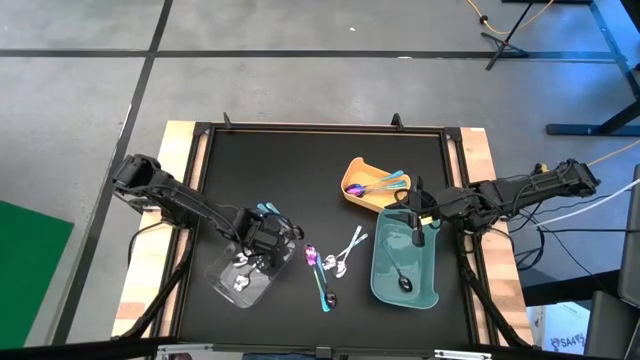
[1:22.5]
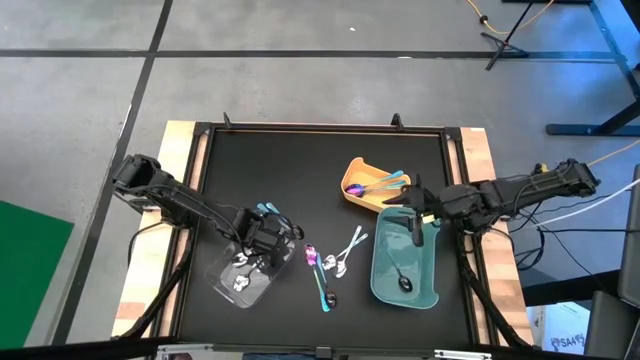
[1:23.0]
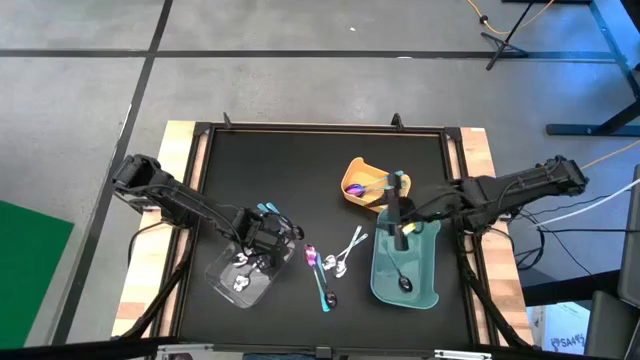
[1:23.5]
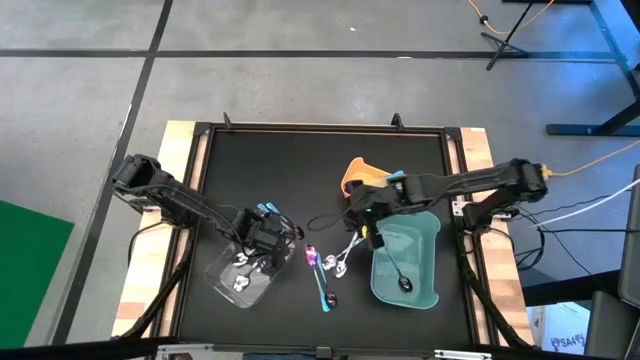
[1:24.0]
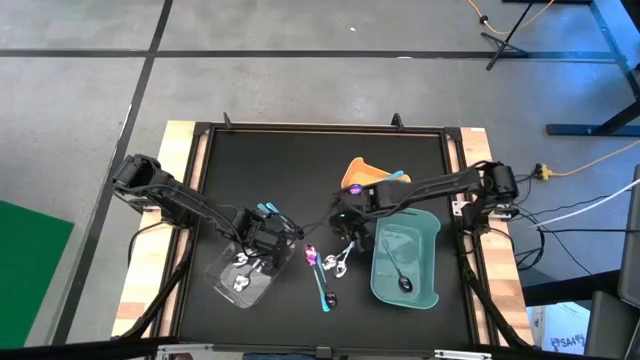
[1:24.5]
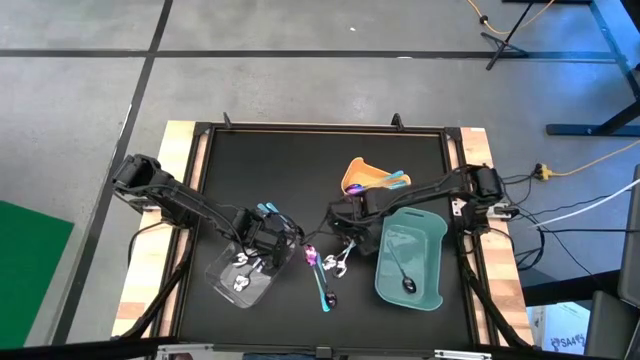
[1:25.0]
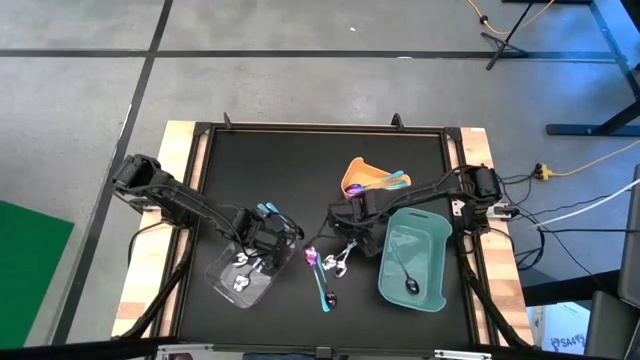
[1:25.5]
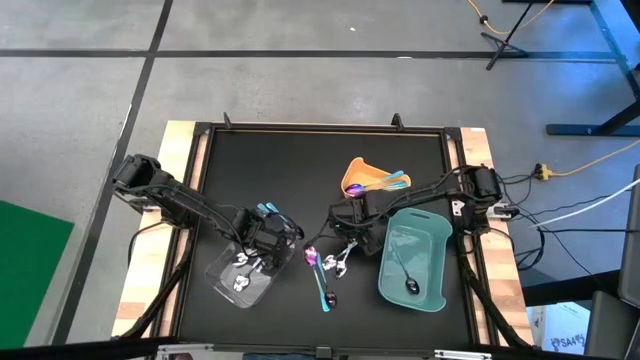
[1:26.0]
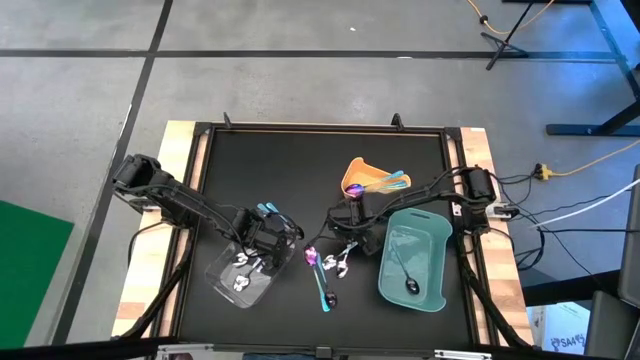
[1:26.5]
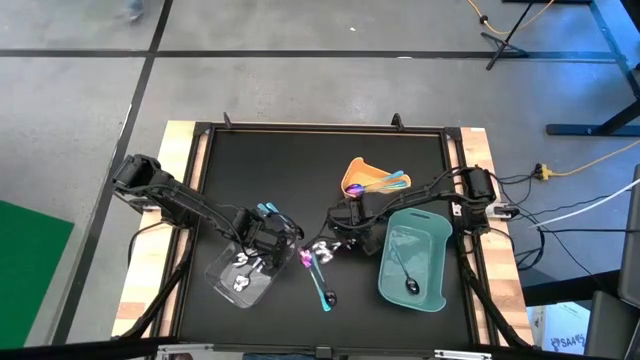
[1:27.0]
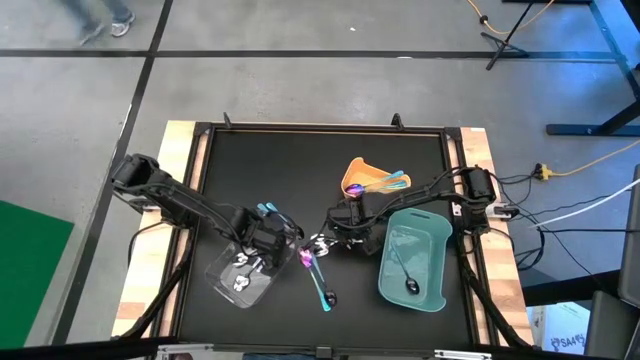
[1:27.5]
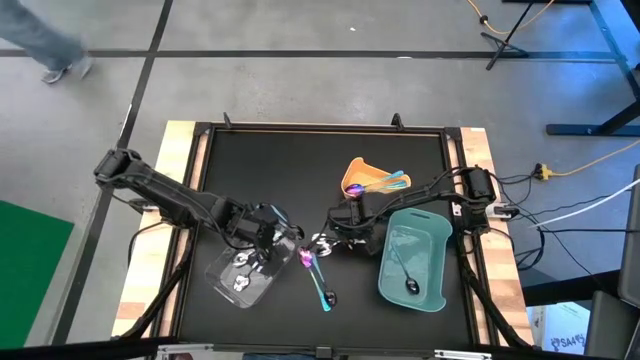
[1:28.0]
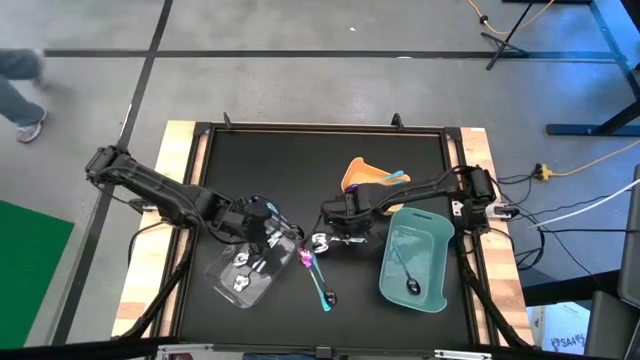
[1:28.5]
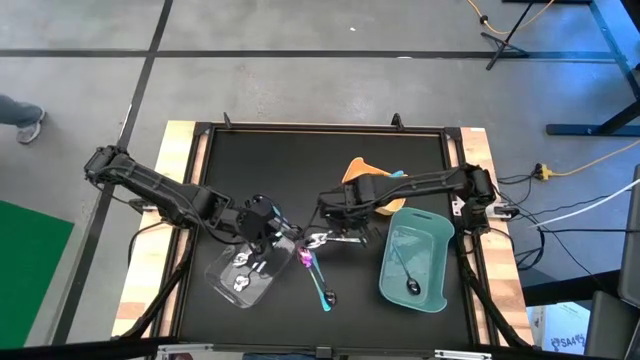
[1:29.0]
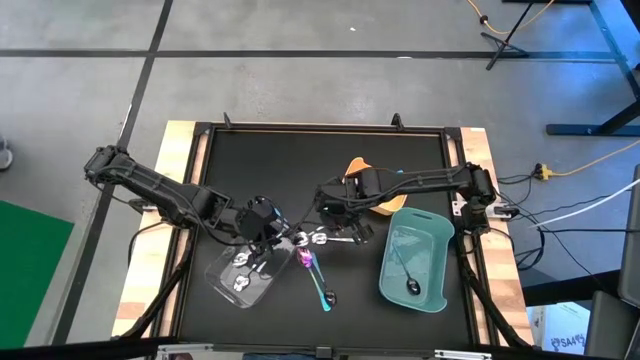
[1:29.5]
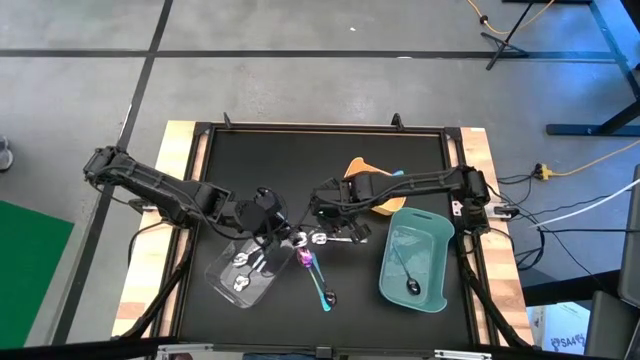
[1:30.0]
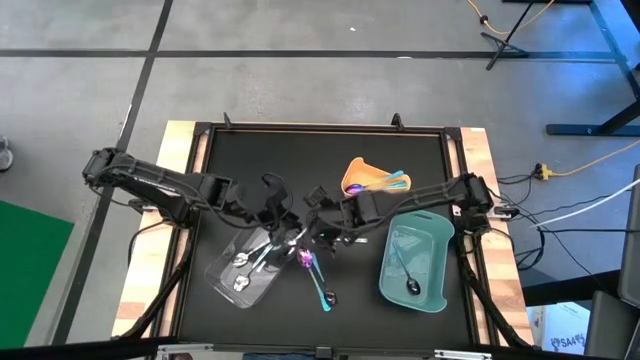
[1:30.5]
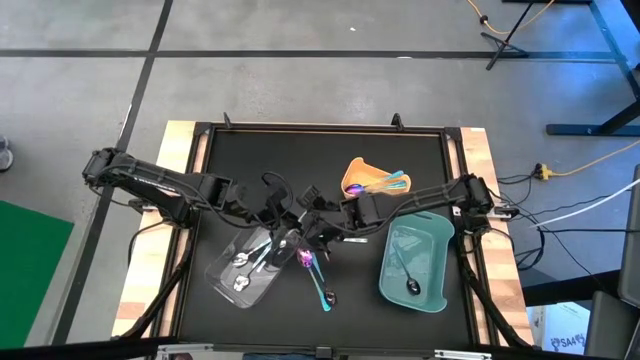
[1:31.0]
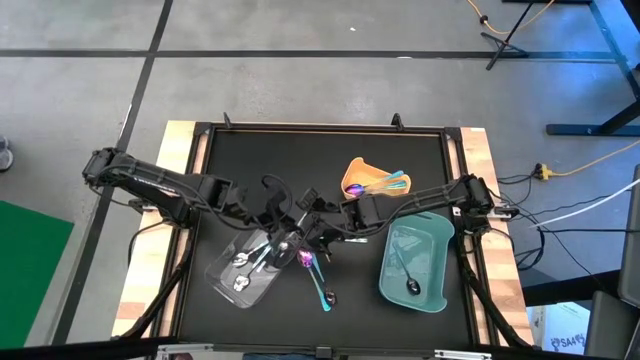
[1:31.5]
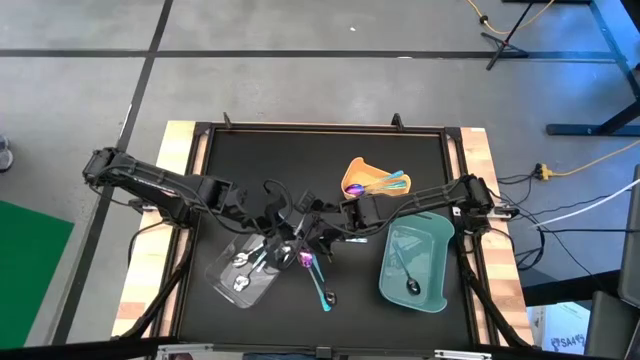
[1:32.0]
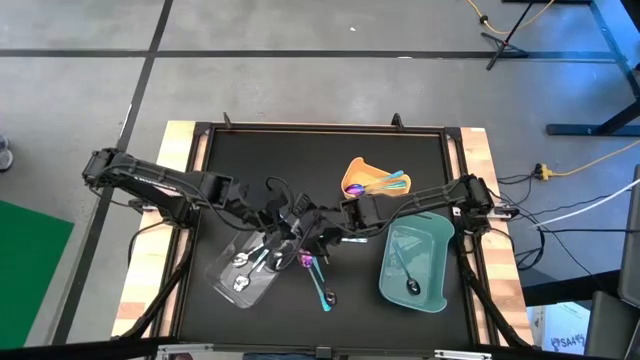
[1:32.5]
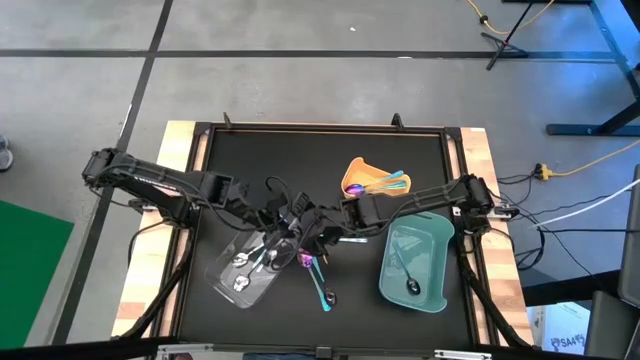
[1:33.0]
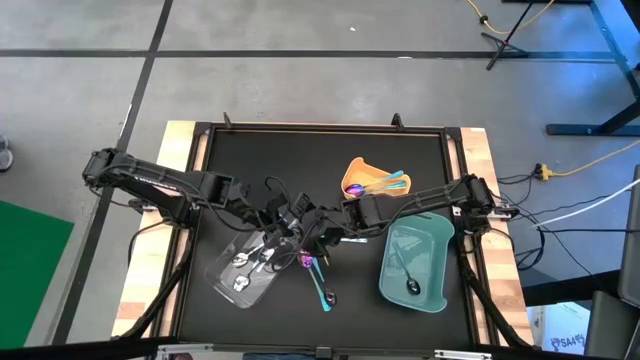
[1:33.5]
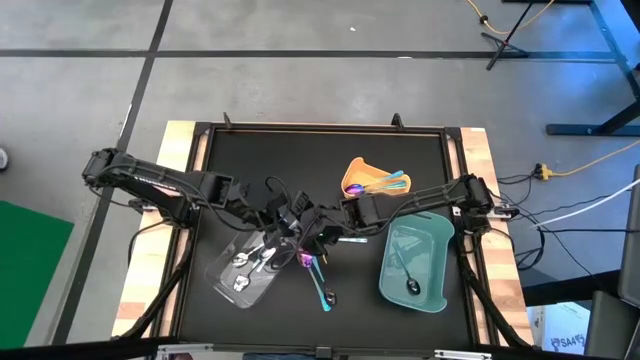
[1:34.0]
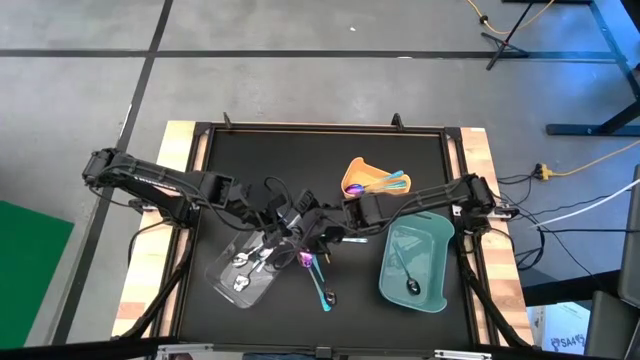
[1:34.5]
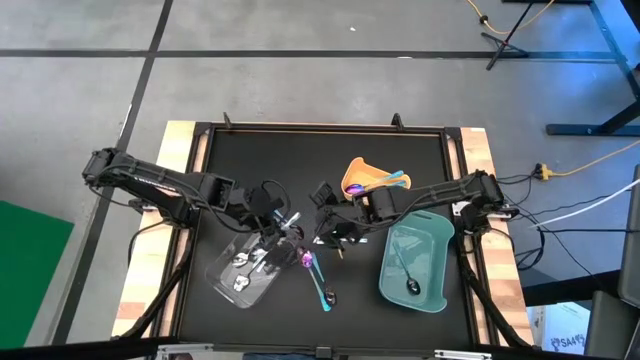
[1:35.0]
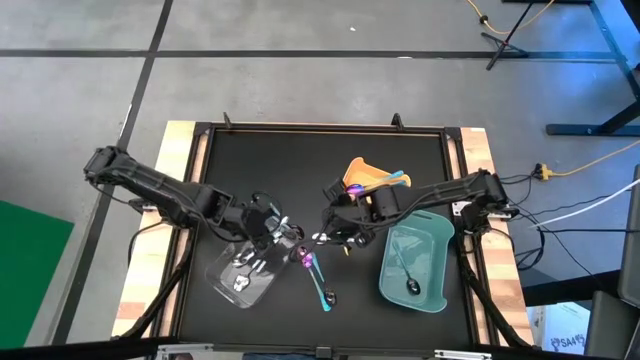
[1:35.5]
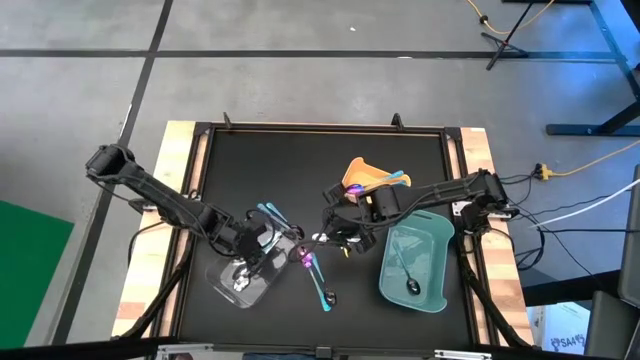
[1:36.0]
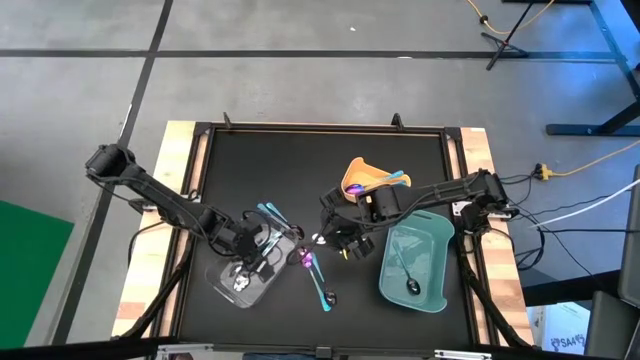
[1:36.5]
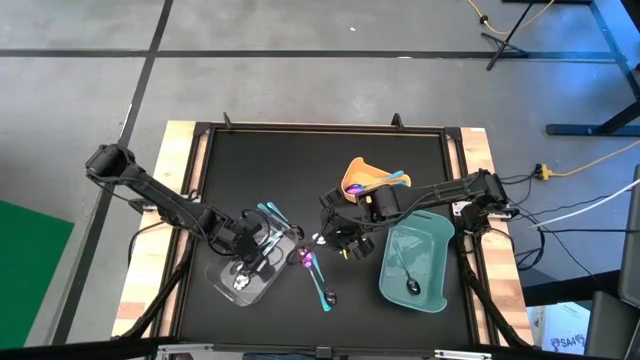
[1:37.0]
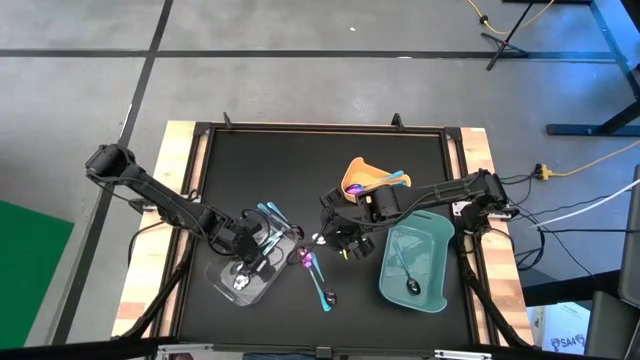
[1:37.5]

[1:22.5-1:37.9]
Task: Sort silverware by color (type)
Put the white patterned spoon into the transparent bin

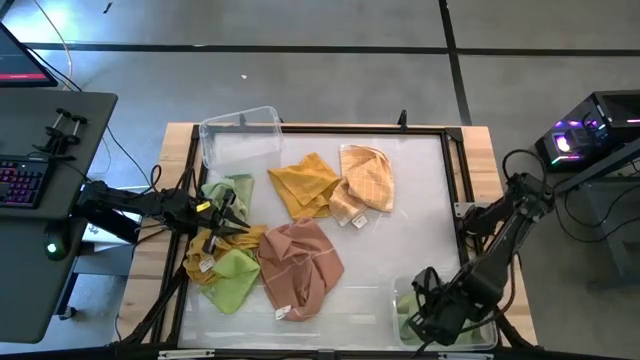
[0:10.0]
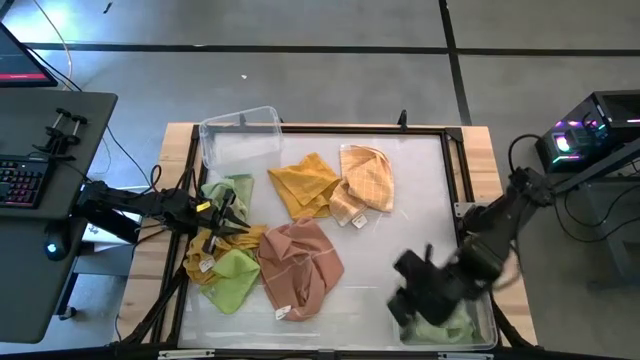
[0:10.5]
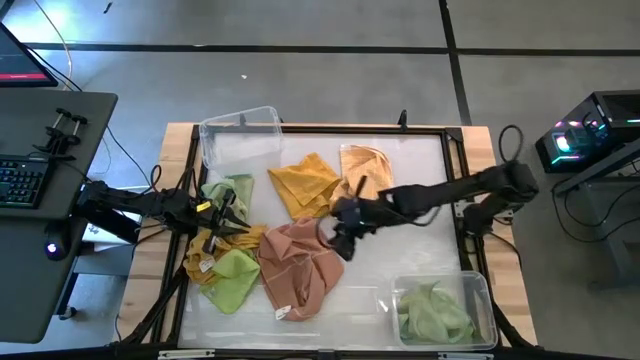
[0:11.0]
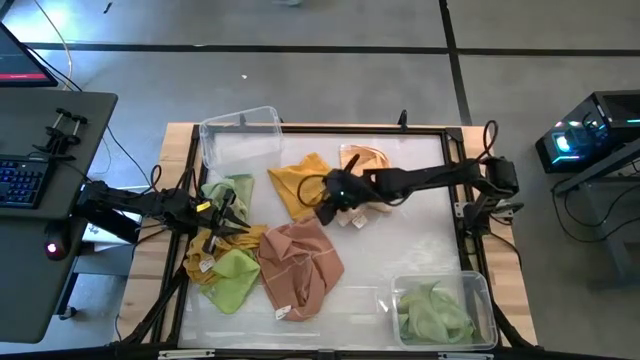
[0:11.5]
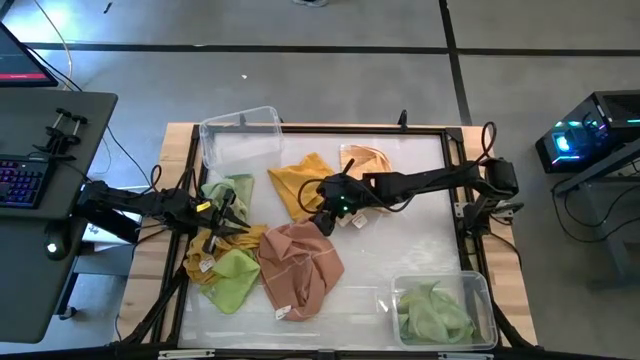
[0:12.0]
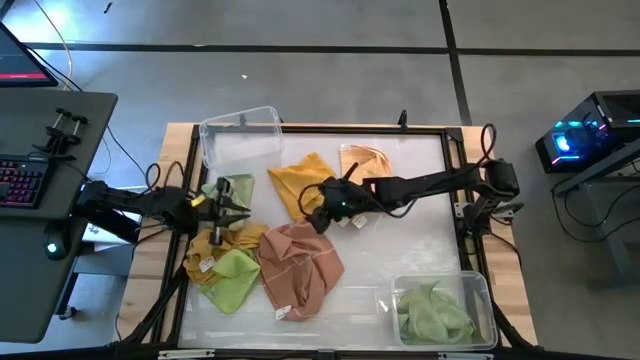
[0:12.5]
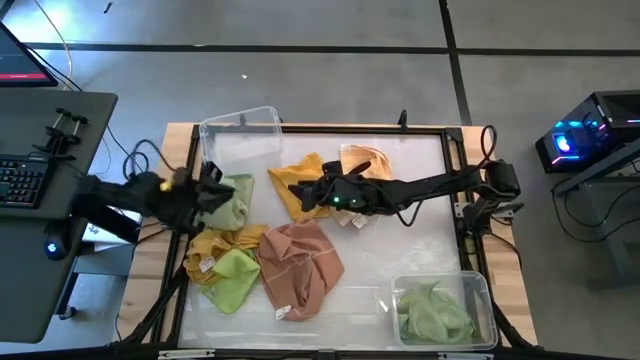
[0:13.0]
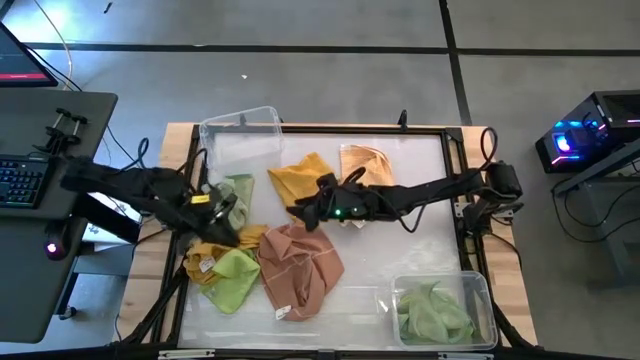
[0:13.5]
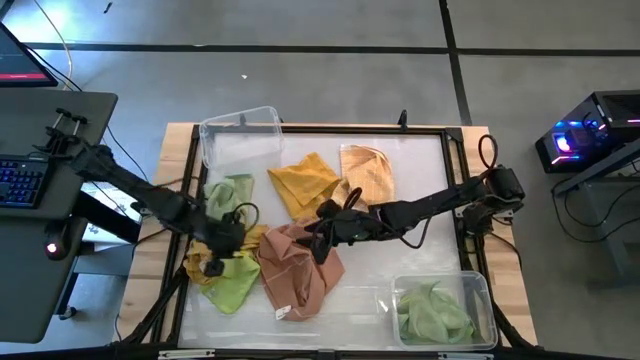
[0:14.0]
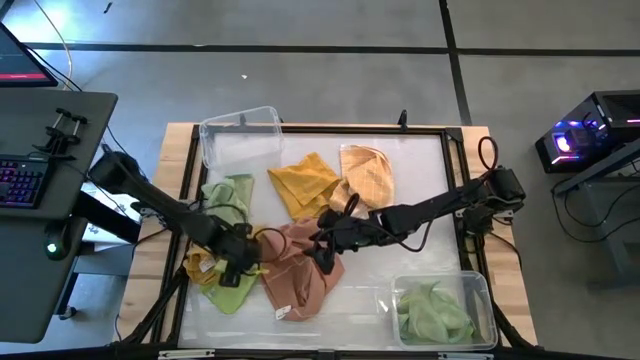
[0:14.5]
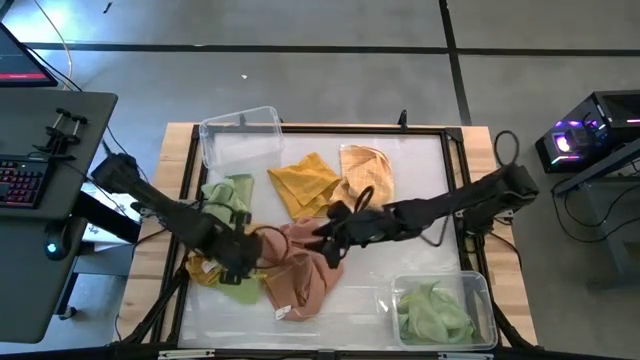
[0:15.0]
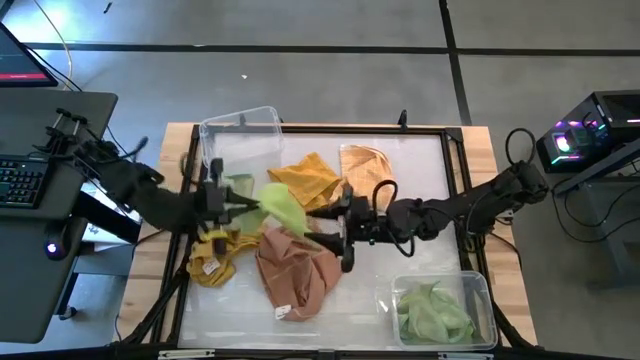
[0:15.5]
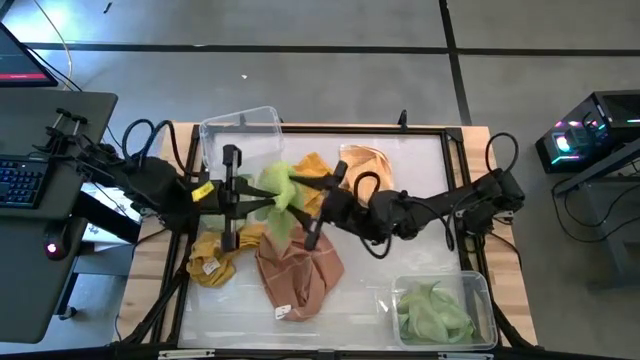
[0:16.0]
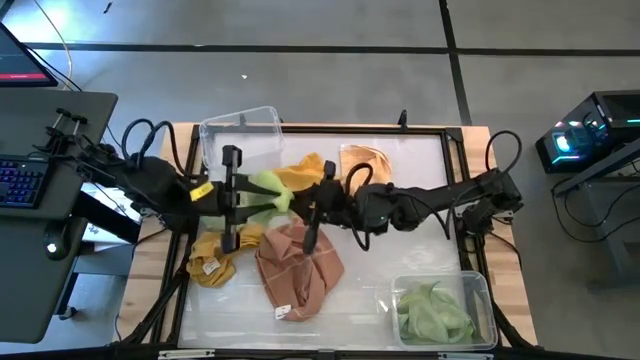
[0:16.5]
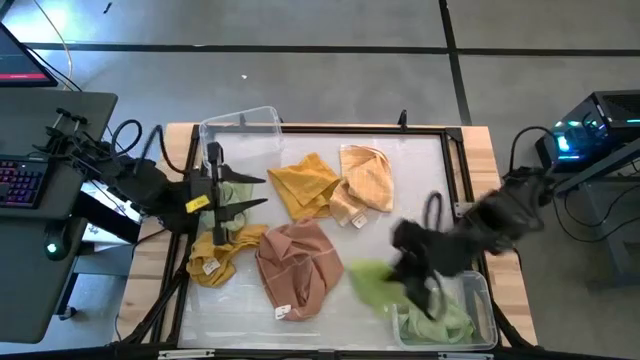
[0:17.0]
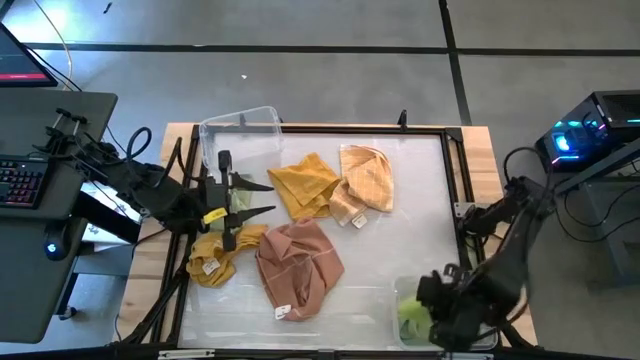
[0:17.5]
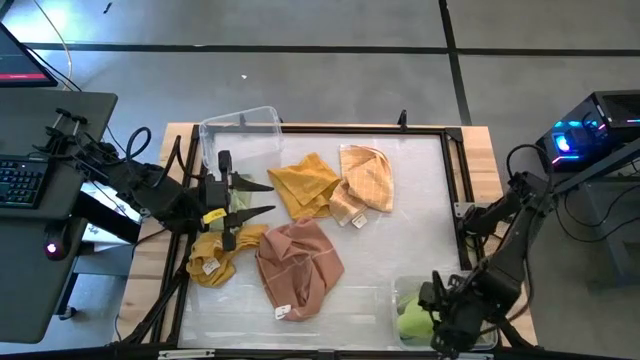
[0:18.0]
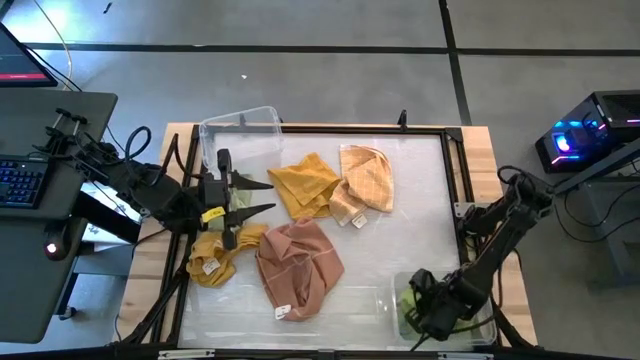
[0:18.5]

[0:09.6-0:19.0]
Task: Sort towels by color in basket
Put the light green microfiber towel into the bottom transparent bin
